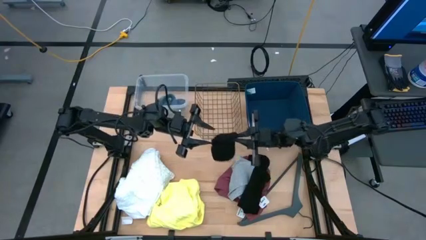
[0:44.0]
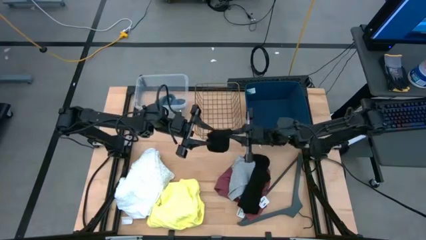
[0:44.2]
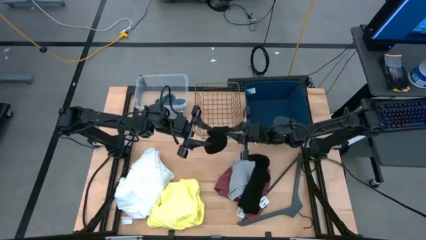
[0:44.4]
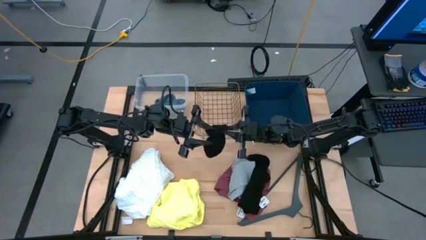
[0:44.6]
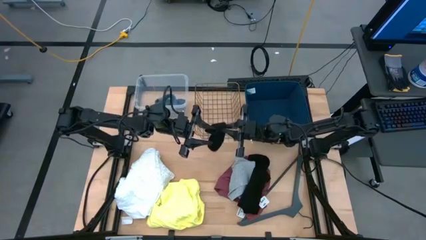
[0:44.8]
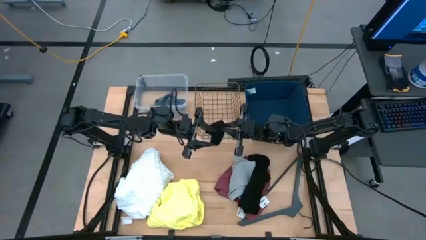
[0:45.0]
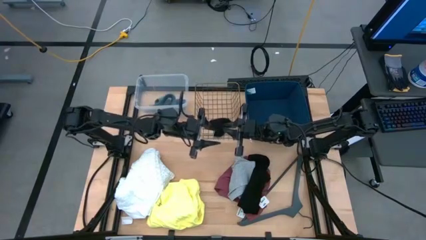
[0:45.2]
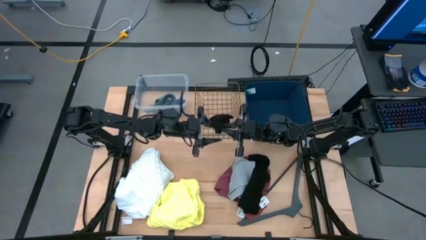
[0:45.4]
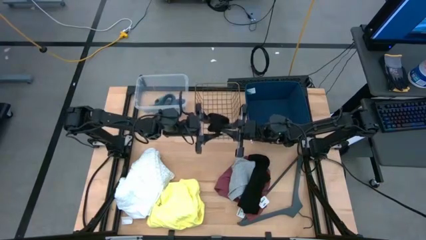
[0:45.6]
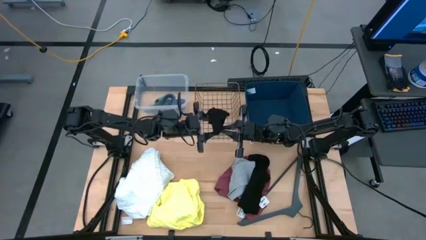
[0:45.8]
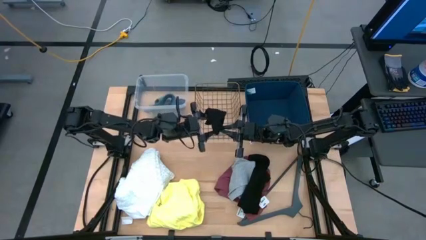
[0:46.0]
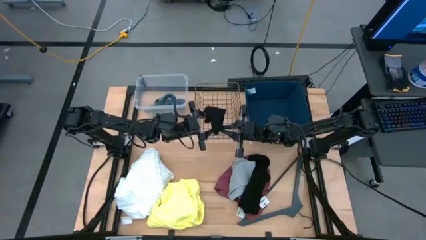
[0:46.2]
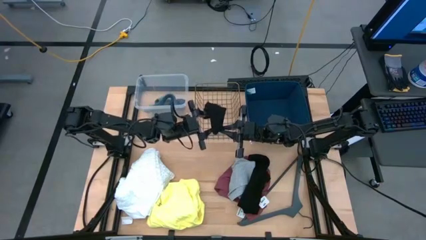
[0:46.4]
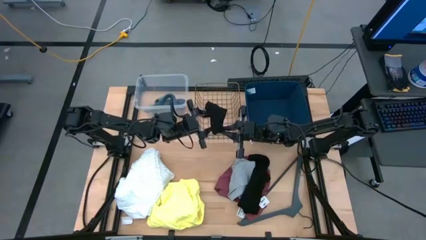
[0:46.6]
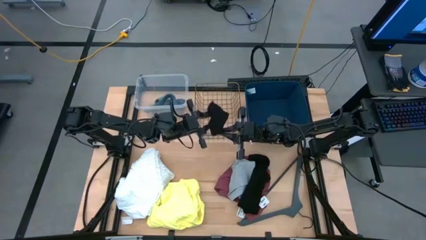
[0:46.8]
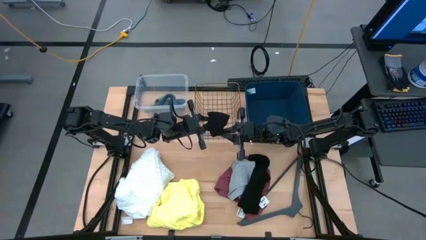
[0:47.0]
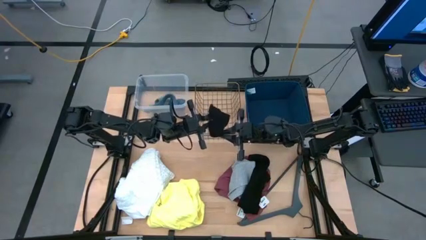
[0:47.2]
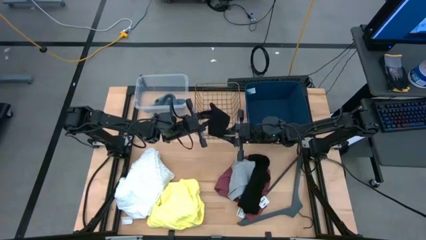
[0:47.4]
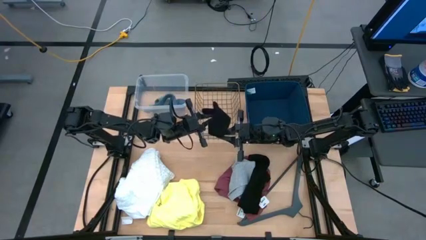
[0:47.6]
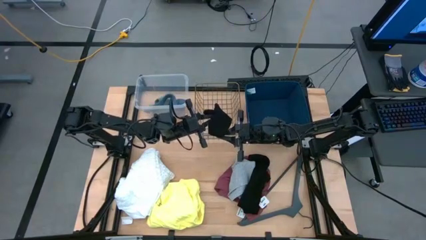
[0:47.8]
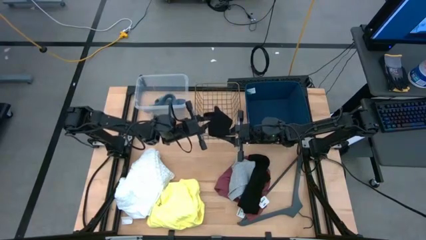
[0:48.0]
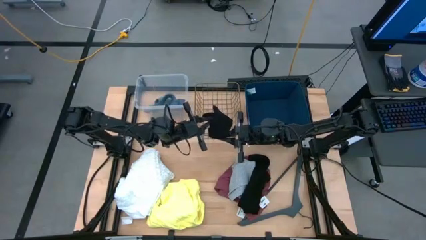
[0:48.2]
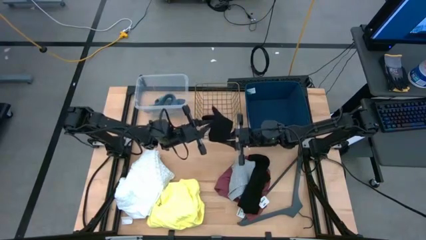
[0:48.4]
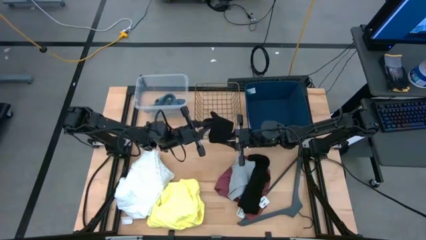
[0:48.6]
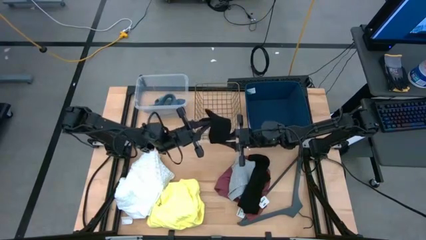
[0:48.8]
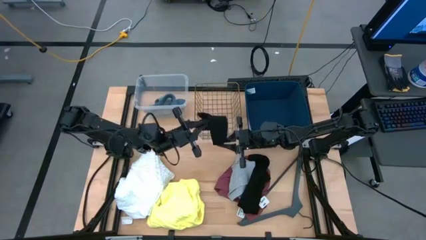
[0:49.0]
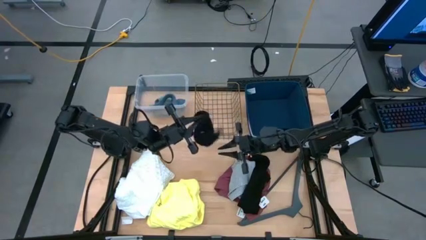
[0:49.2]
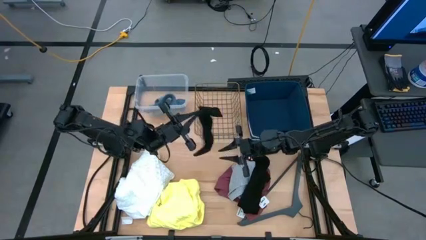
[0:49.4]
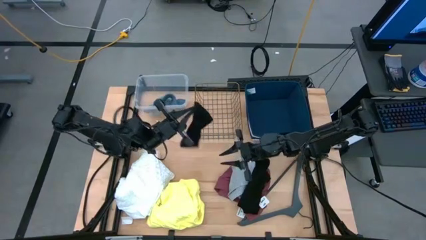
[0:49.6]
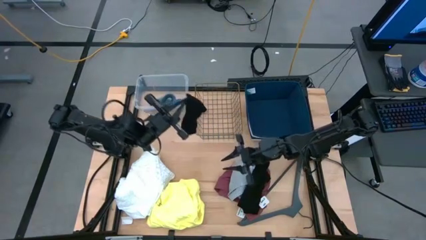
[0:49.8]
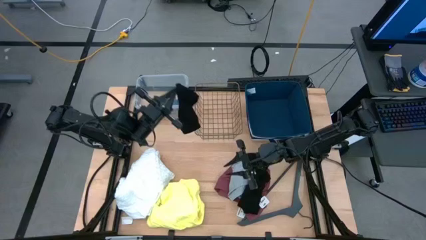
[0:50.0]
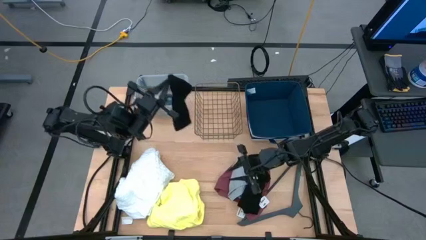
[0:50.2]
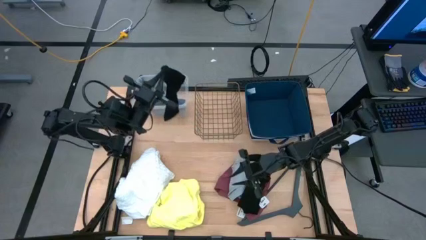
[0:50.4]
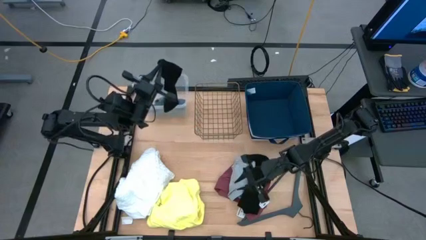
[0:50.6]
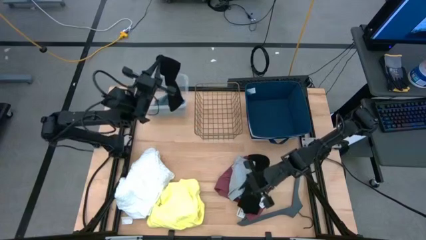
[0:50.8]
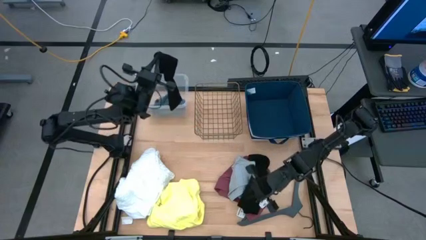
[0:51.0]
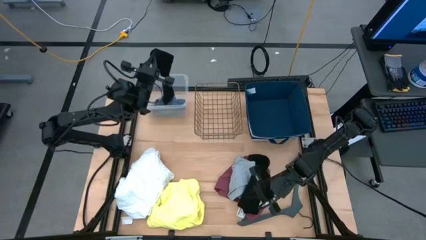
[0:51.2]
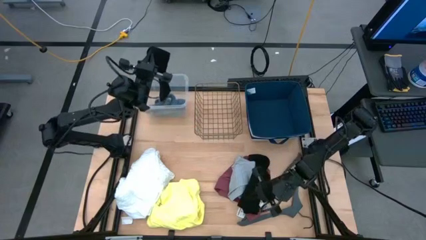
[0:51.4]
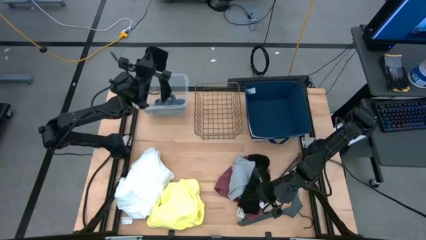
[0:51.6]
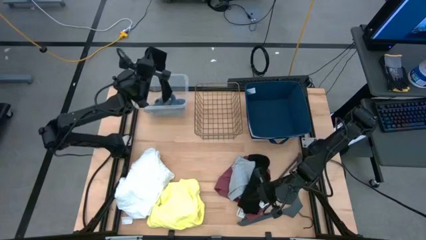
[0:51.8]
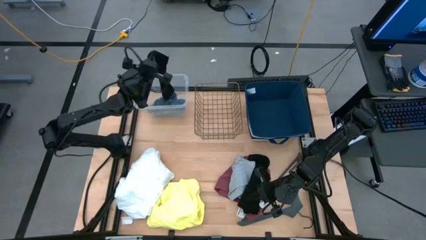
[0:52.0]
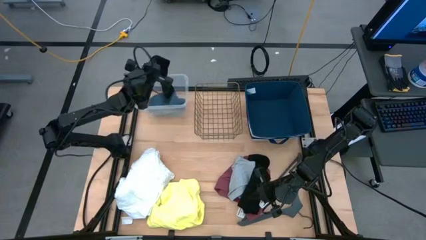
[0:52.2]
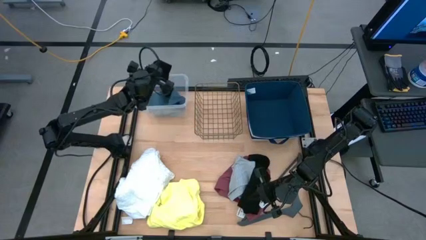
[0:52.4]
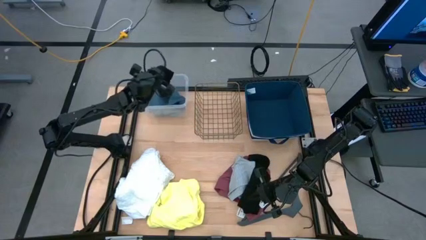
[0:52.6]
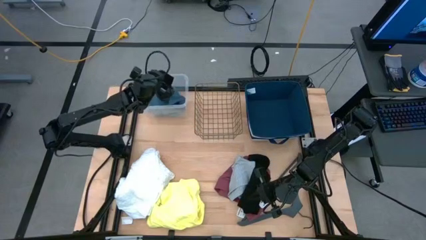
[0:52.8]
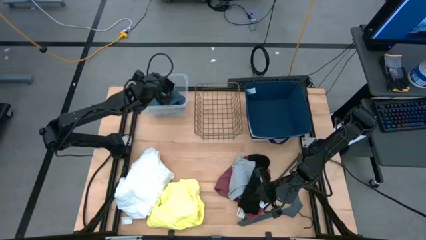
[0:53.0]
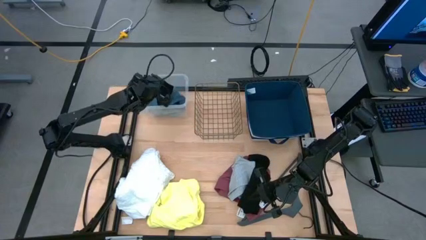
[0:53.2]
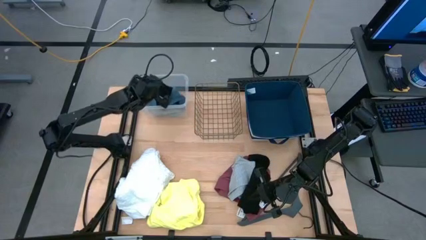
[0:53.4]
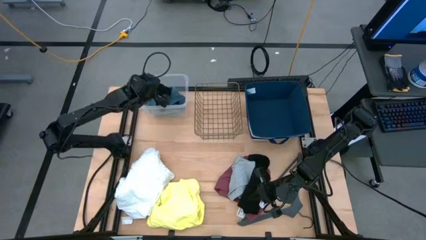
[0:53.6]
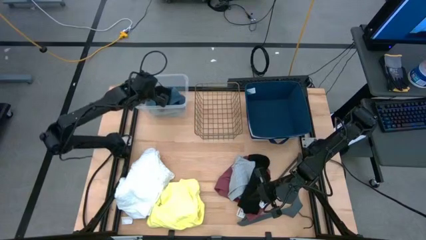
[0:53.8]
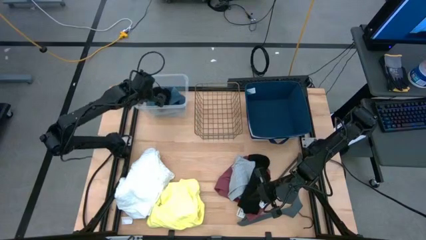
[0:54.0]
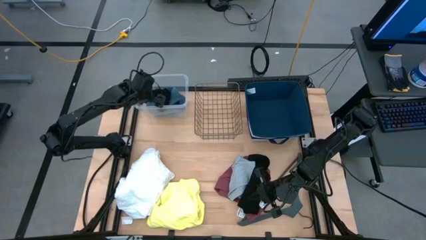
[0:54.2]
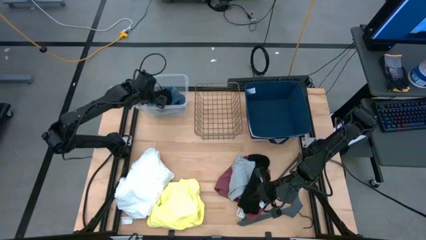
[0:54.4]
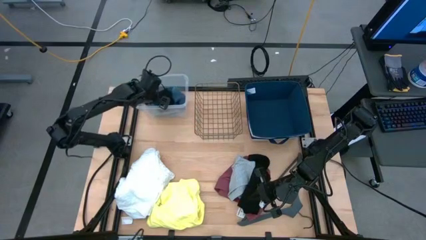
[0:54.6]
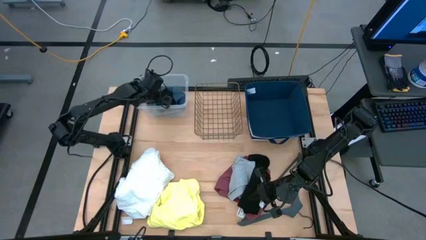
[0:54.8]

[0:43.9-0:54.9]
Task: Pick & Place Cloths
Put the black sock into the transparent container

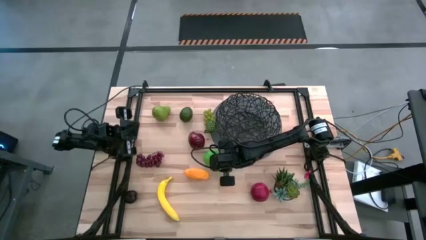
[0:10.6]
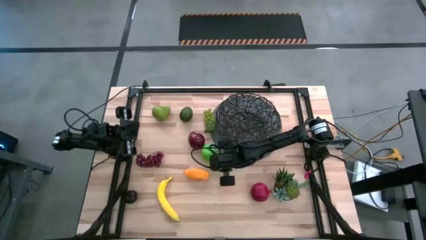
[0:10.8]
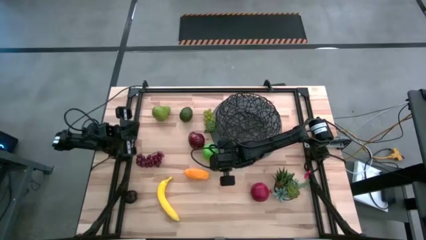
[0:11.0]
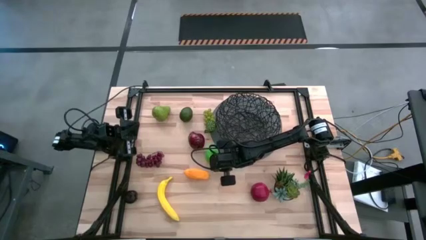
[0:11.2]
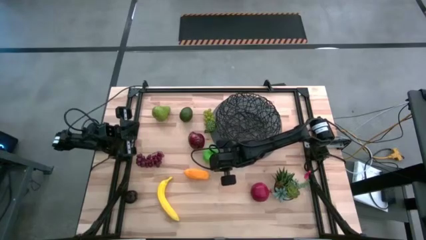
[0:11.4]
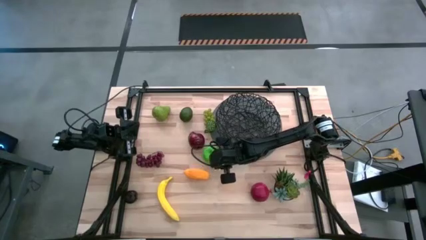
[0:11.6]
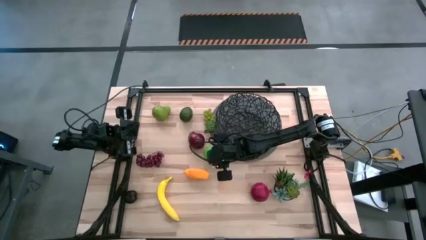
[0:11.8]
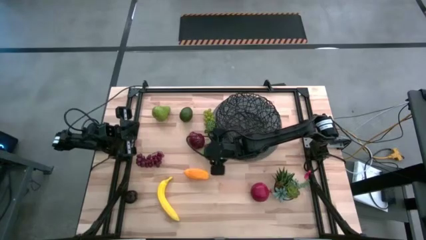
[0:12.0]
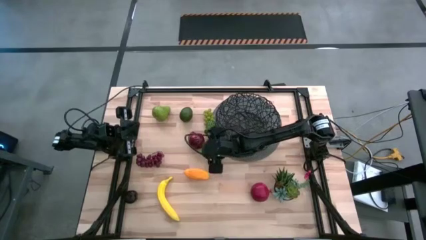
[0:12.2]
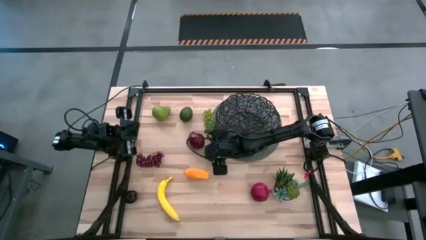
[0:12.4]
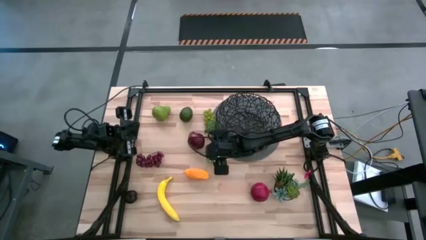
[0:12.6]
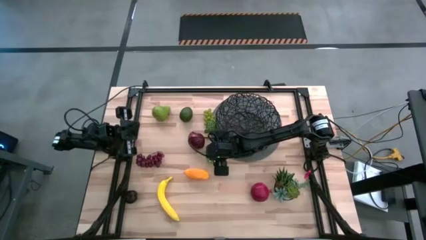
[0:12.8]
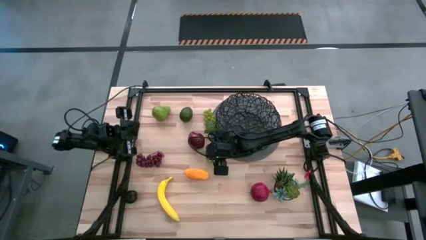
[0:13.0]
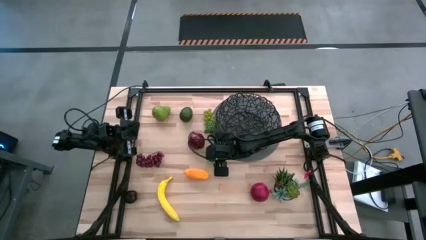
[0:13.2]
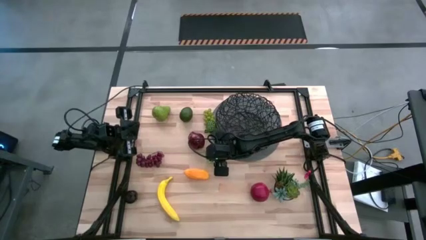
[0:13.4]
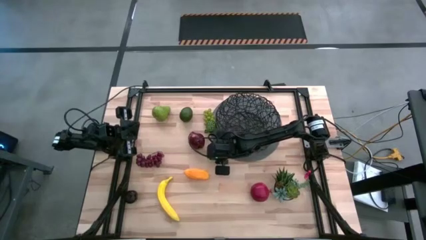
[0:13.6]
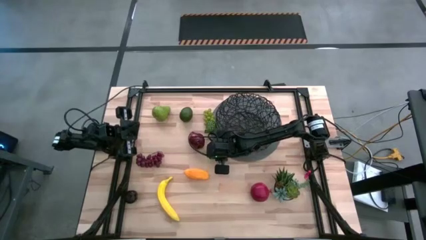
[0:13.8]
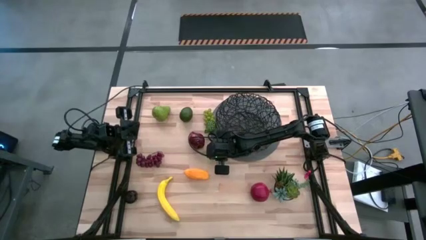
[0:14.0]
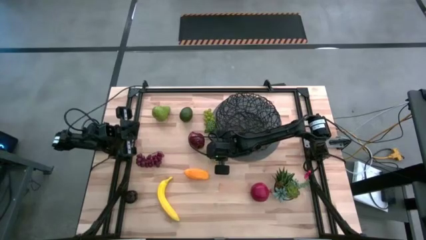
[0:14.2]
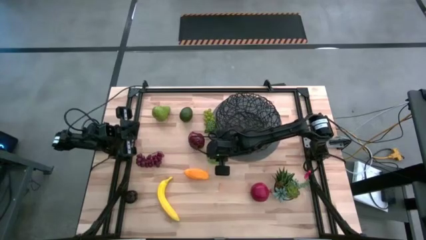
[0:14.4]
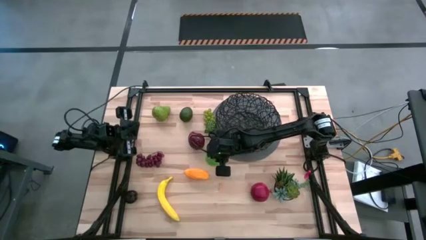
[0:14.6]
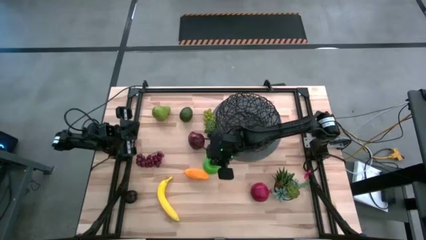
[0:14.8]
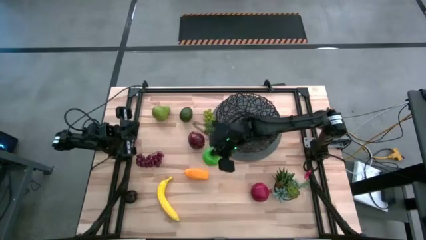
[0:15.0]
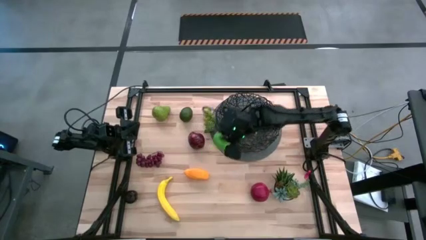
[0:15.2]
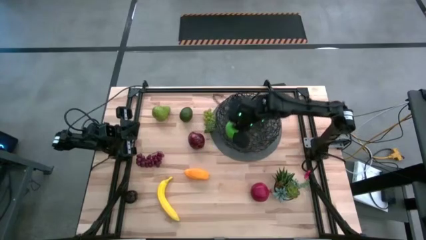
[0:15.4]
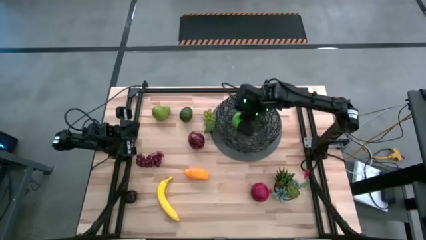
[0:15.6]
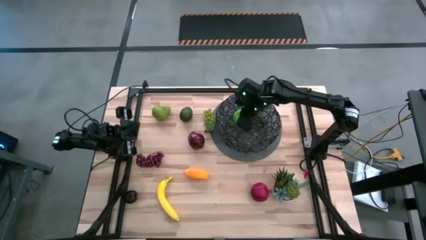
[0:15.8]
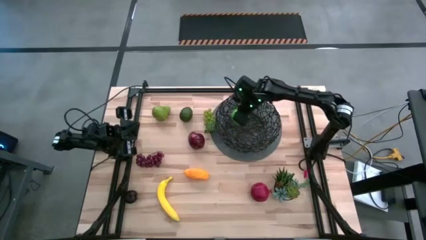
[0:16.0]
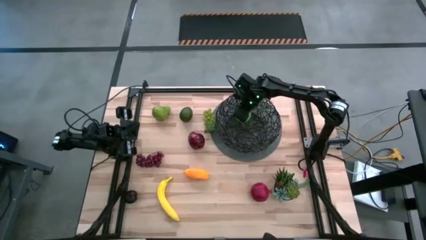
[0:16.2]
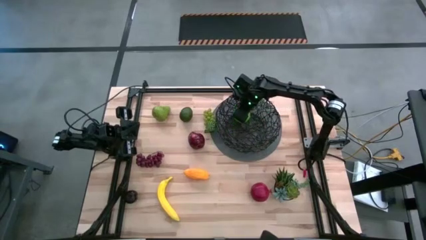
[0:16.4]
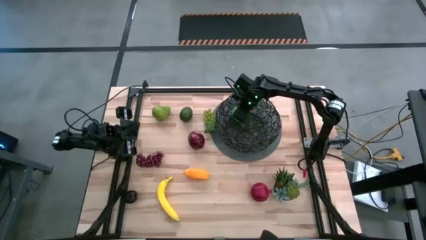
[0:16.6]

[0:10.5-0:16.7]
Task: Build produce basket
Put the green apple into the wire basket
